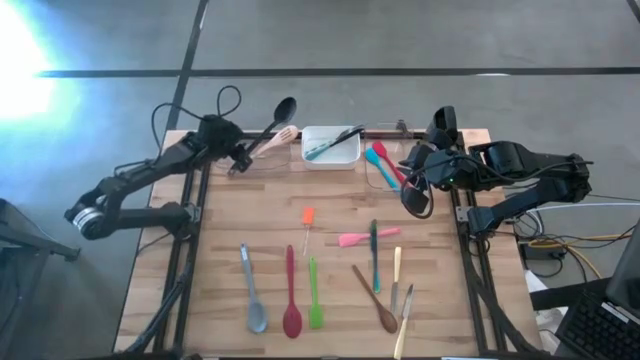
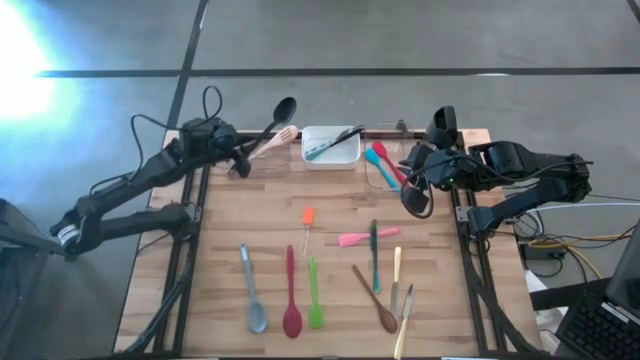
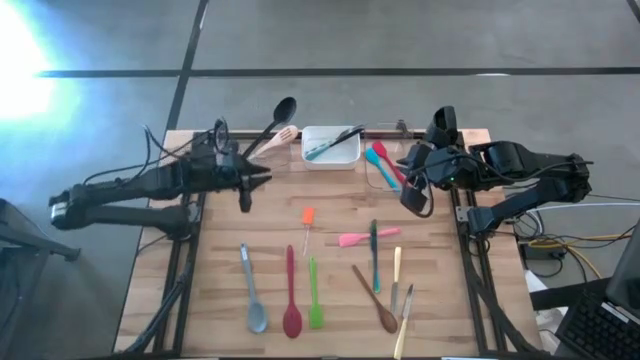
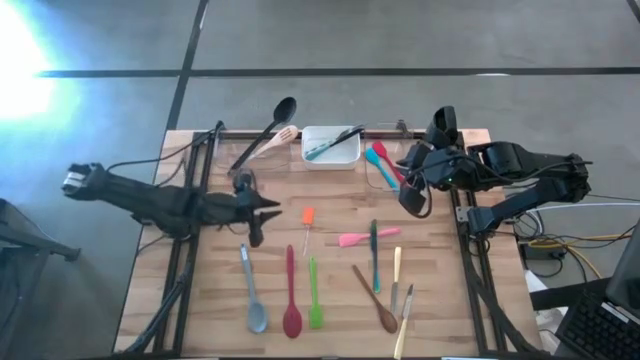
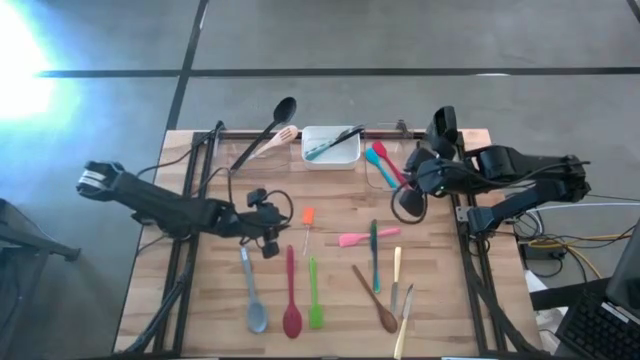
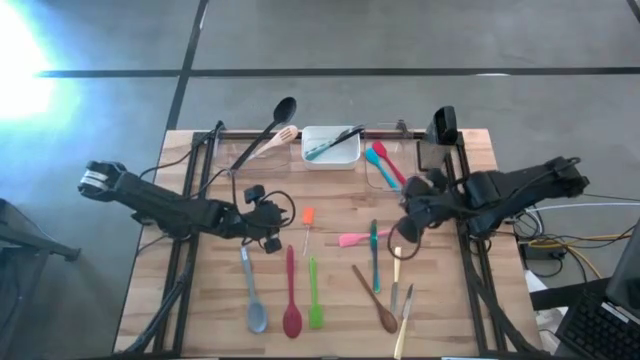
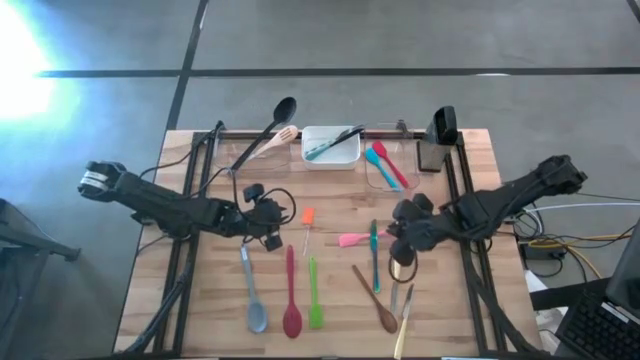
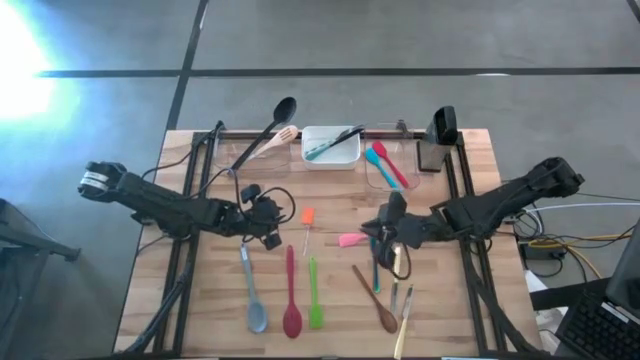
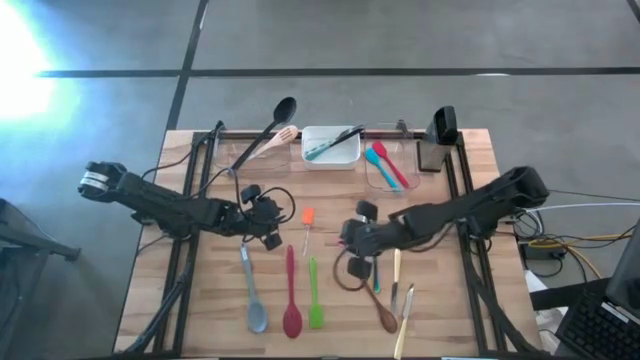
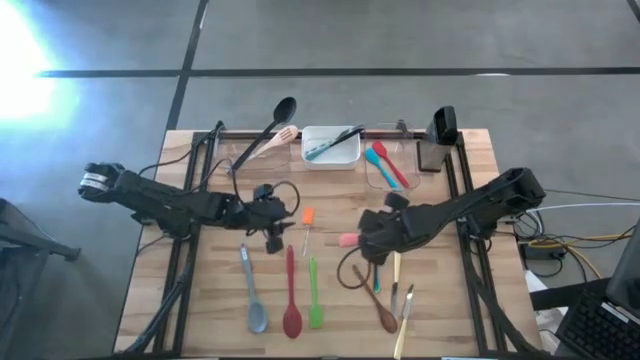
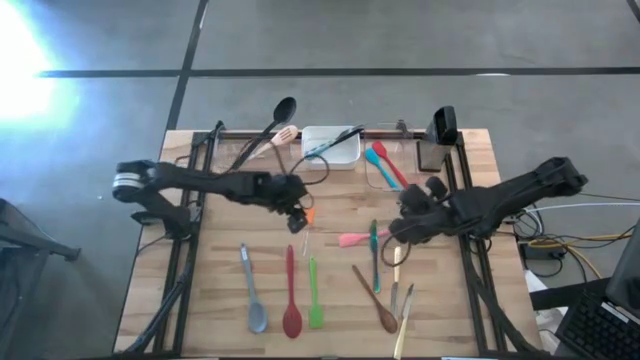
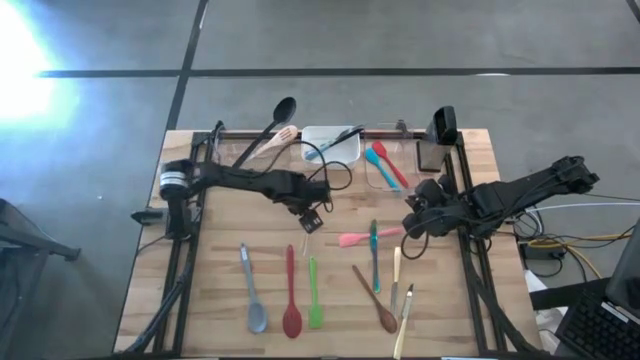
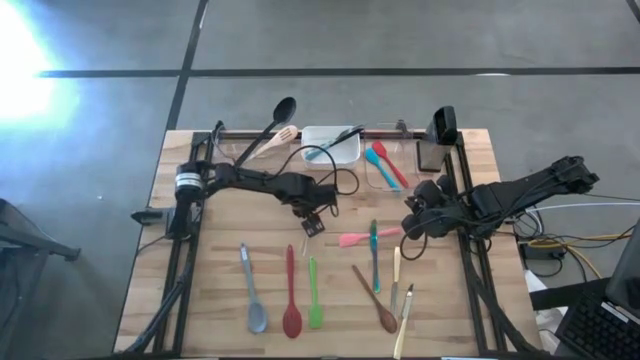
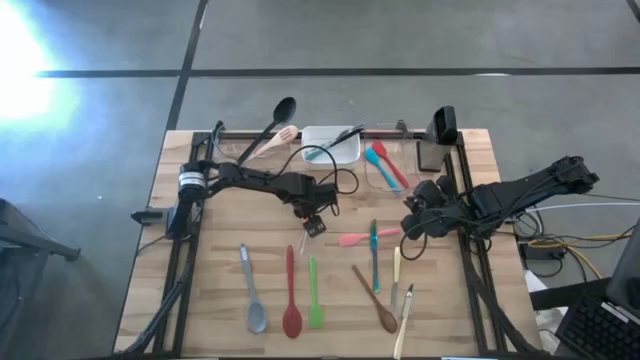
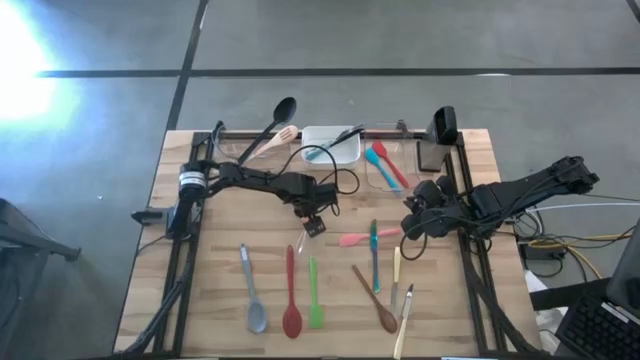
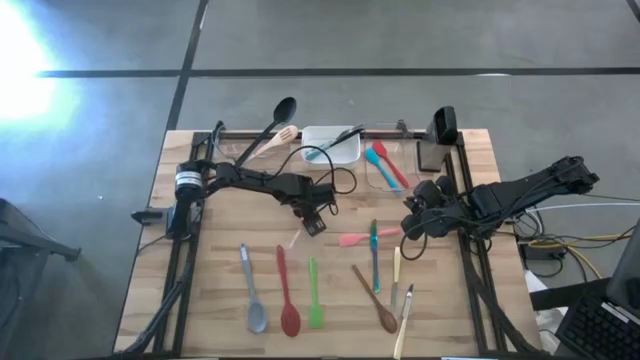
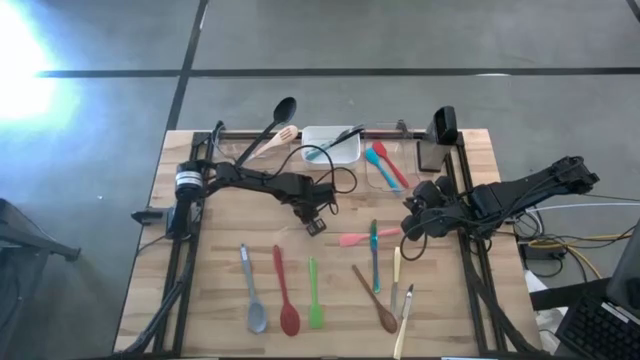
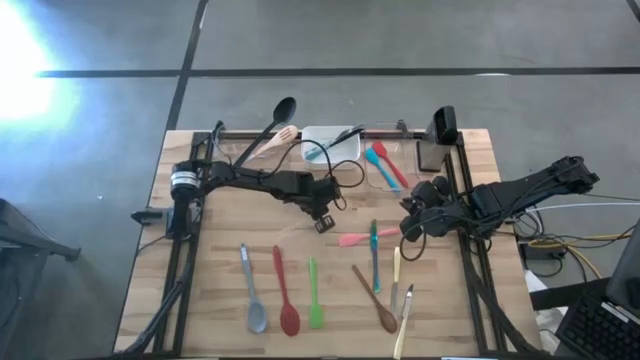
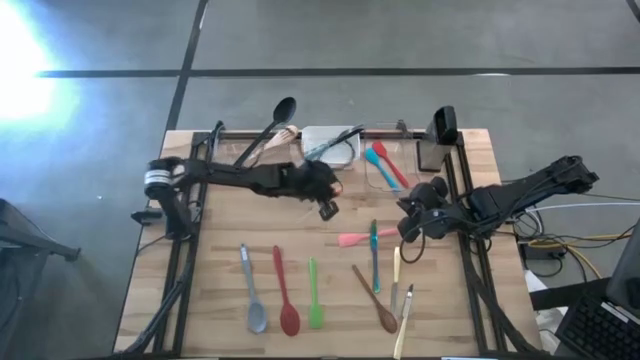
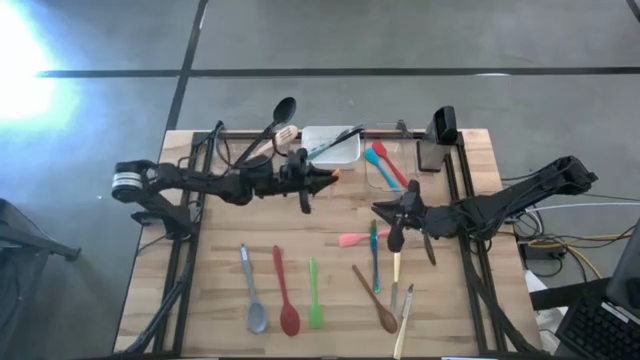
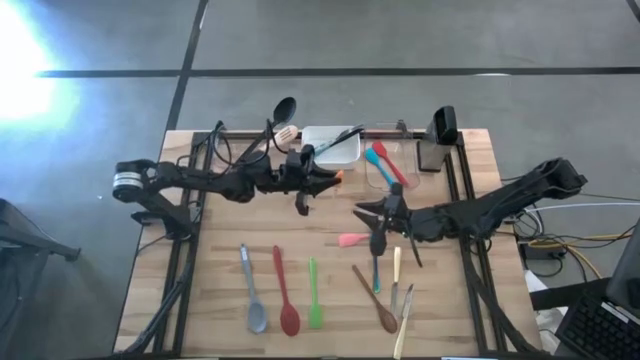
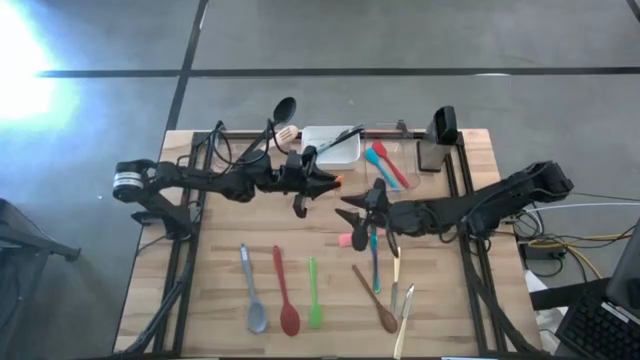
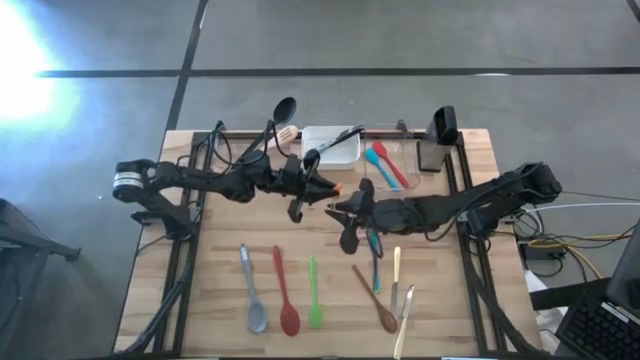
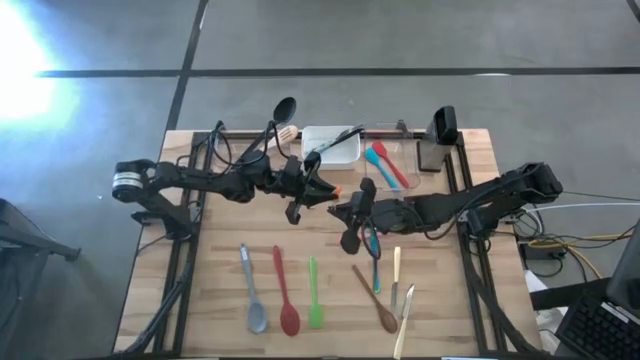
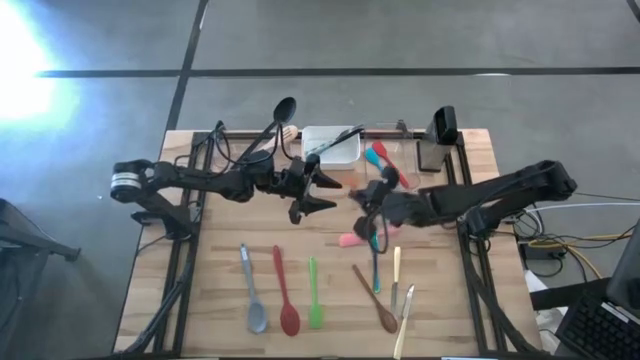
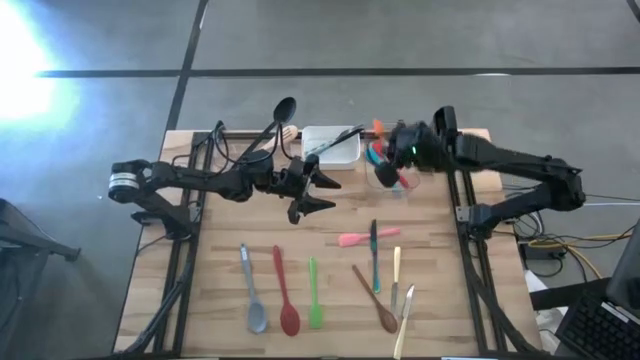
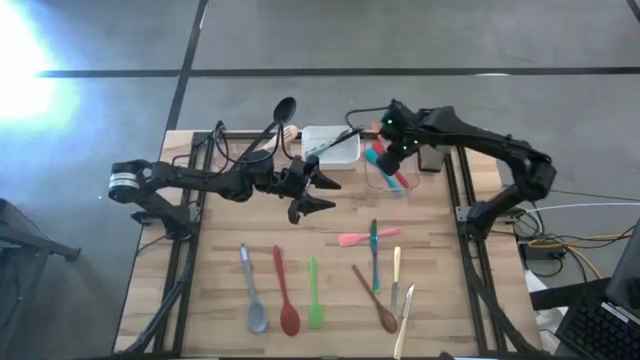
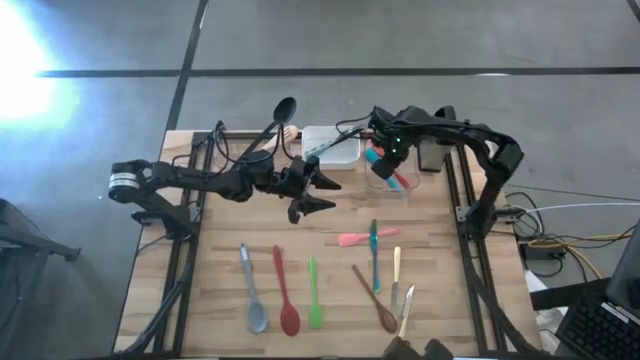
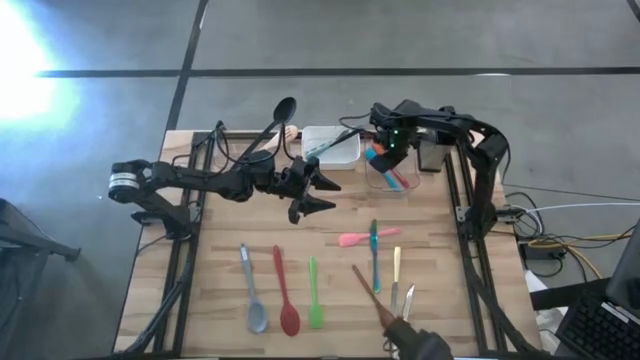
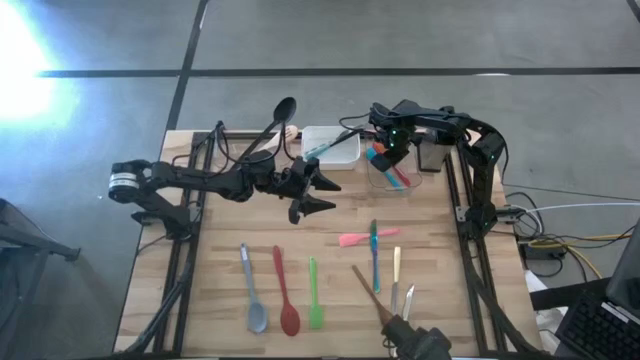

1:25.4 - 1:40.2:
Task: Pick & Place Kitchen Items
Put the orange spatula into the right transparent bin
